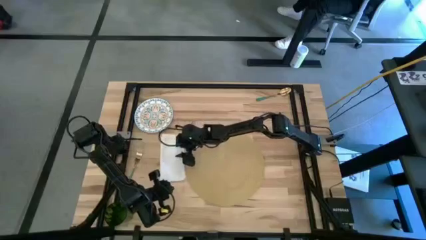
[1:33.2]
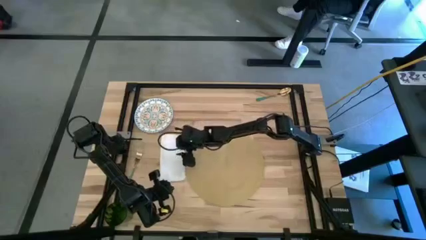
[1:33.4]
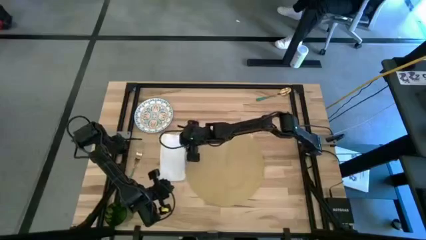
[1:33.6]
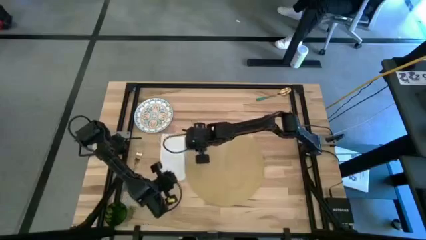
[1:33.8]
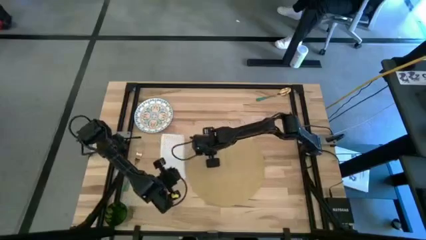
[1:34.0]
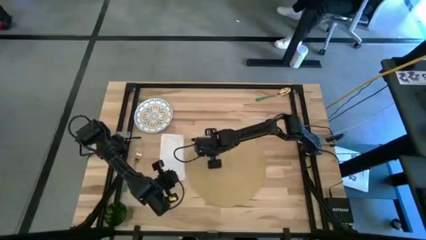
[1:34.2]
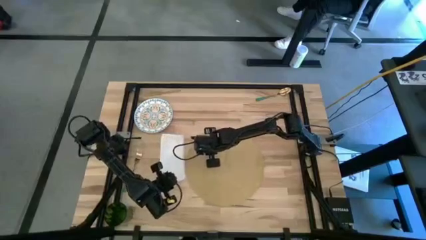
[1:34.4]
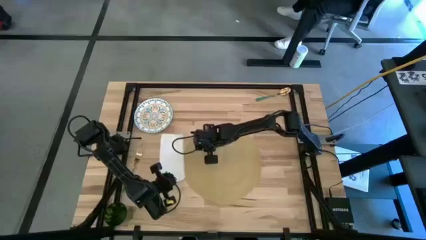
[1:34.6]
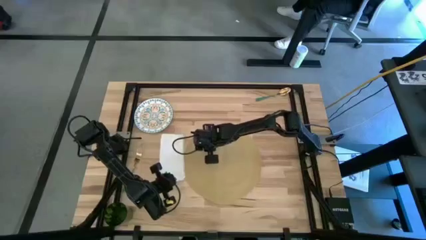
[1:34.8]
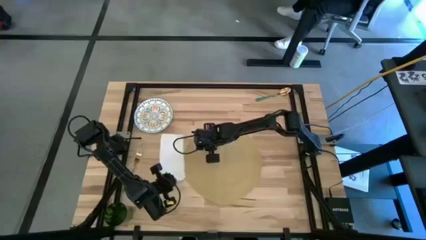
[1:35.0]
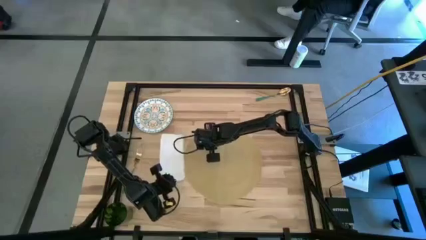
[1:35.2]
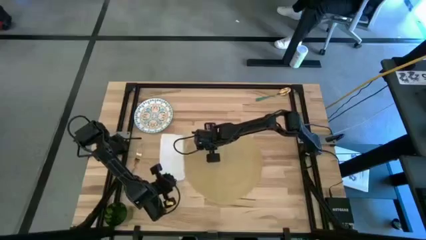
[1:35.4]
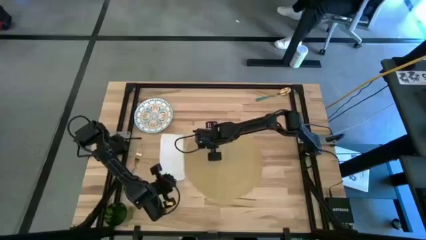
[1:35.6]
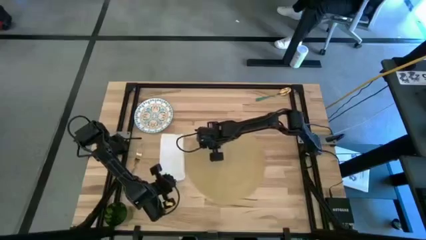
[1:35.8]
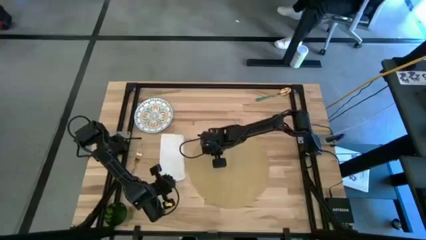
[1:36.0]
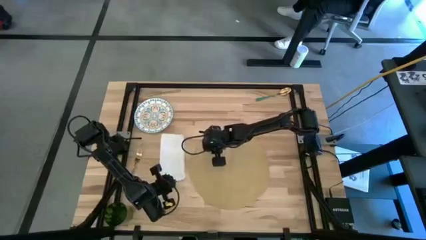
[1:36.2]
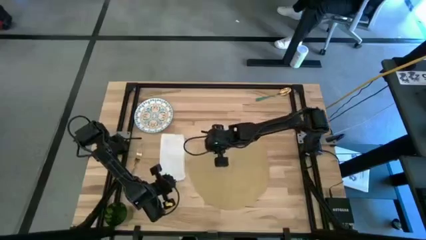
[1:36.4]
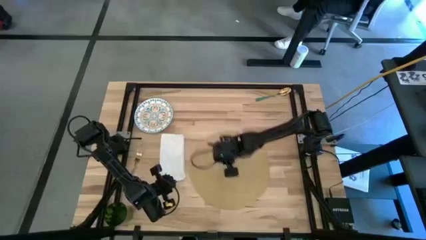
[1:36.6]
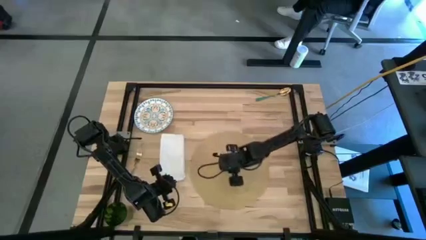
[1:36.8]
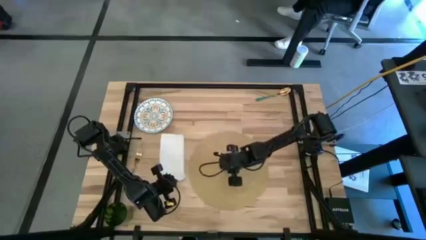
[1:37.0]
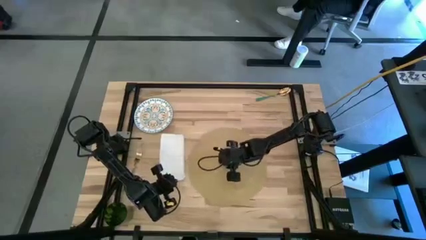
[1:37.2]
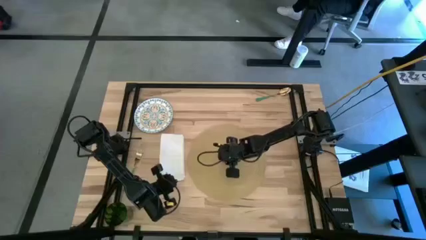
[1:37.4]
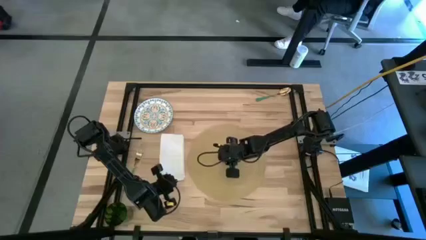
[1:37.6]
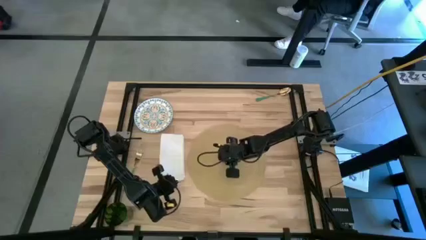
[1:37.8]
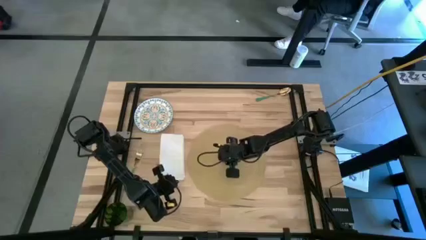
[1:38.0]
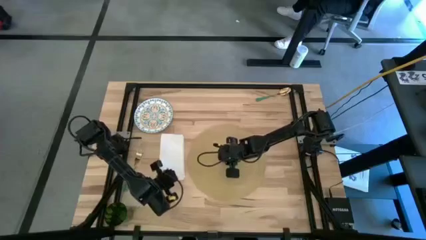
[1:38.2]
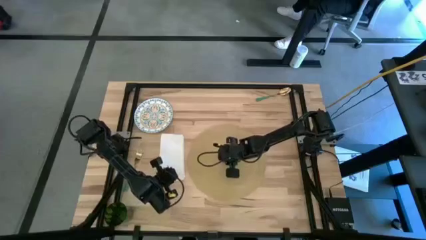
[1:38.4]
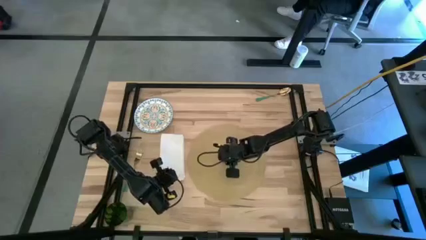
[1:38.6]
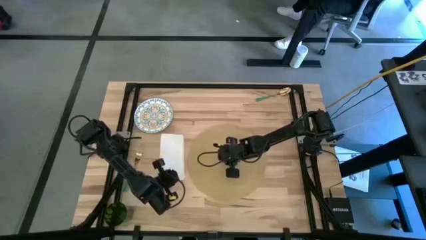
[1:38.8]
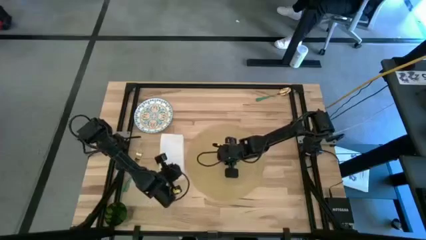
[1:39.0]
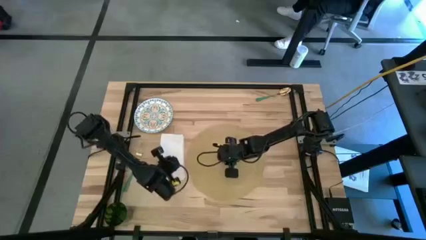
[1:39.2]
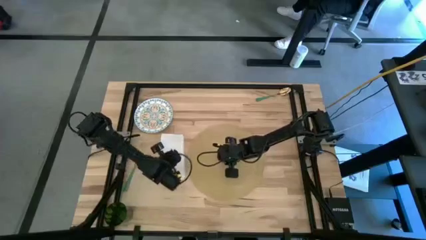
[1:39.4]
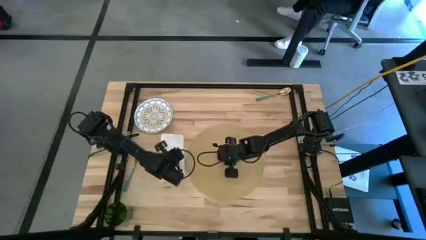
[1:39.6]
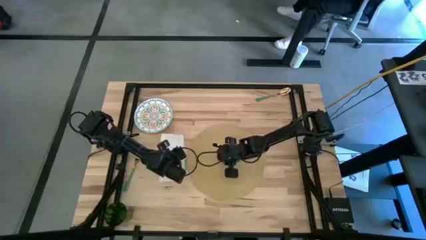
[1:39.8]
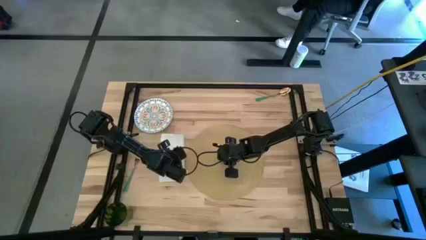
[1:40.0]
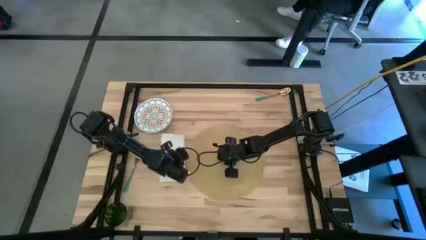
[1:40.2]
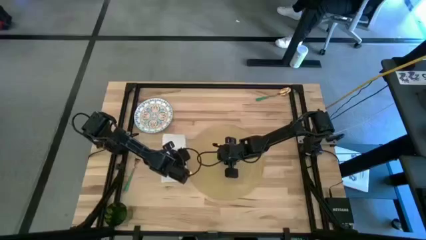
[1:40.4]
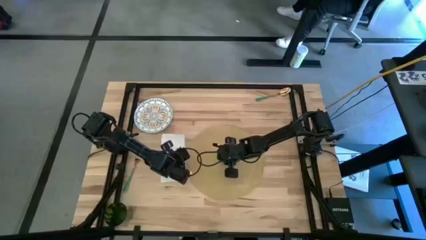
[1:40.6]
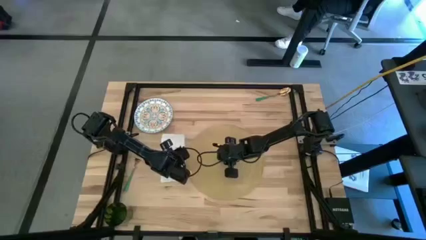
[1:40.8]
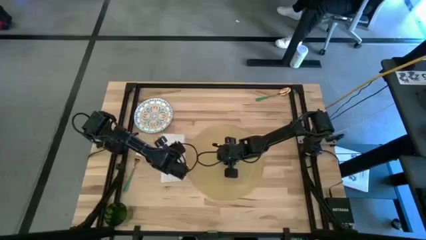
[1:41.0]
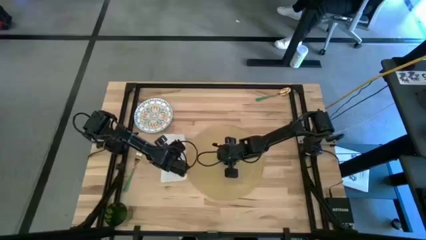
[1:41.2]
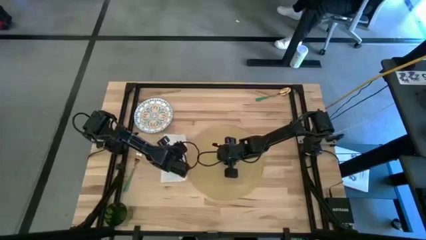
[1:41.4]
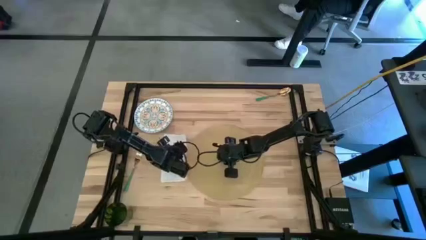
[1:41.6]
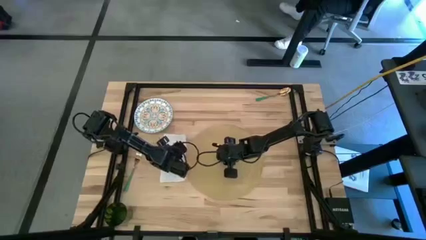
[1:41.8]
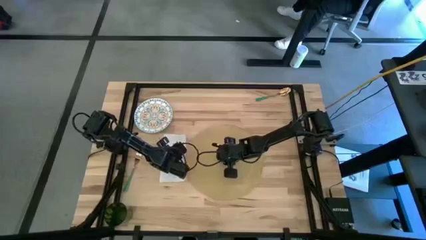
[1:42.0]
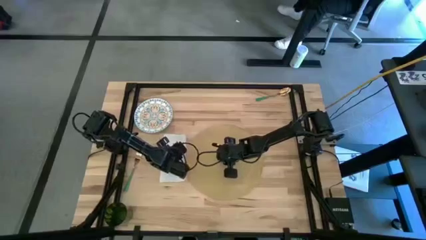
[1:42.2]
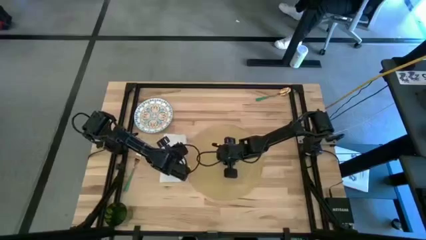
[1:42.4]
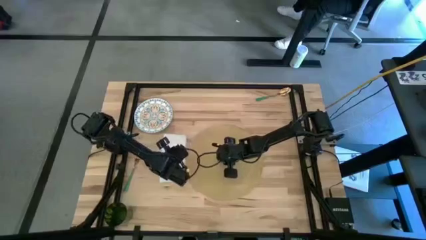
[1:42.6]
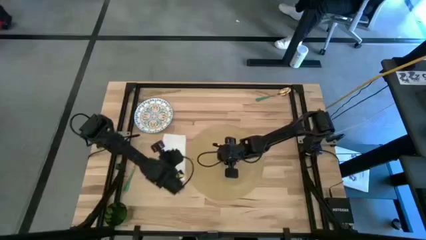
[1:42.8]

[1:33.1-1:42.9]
Task: Set table place
Adjust the brown place mat
